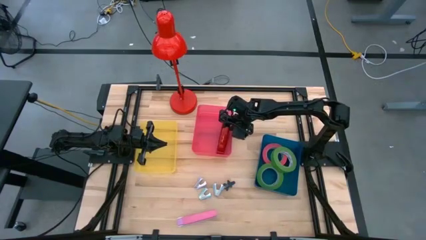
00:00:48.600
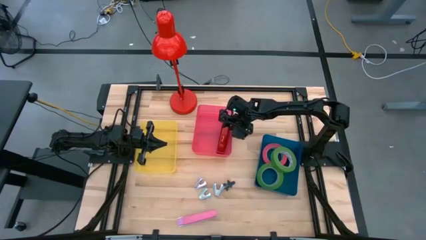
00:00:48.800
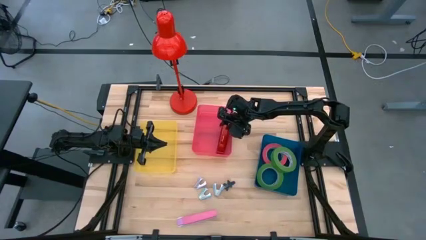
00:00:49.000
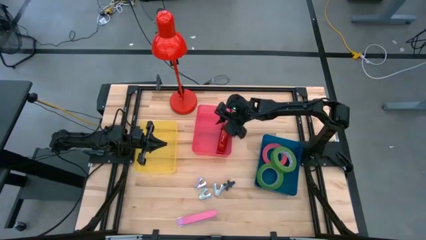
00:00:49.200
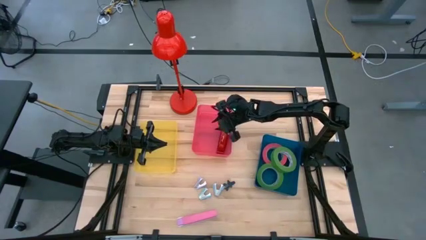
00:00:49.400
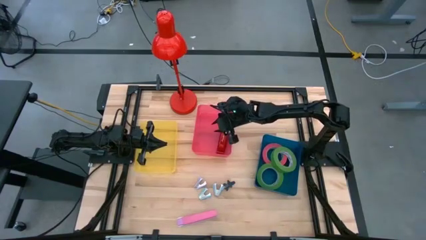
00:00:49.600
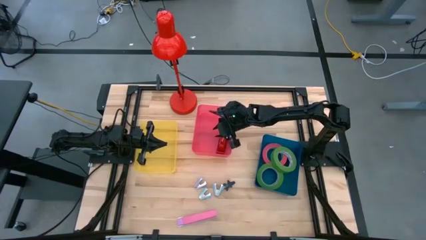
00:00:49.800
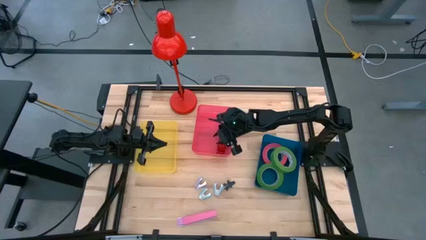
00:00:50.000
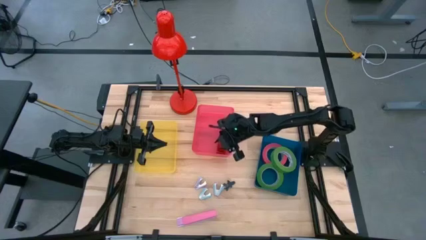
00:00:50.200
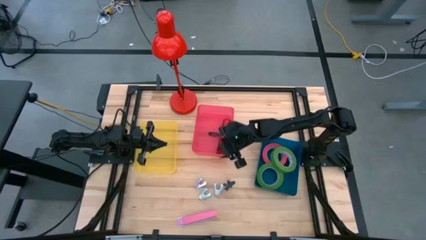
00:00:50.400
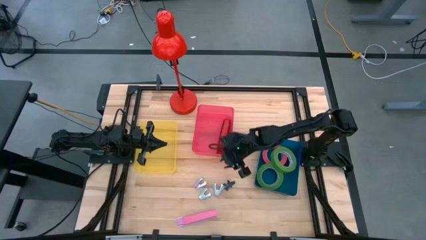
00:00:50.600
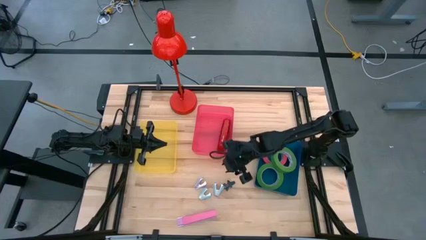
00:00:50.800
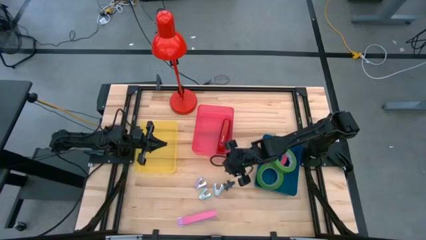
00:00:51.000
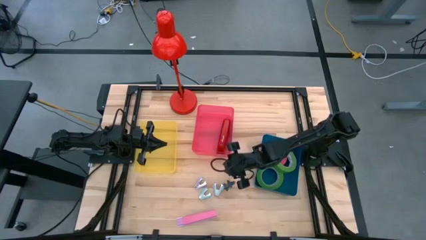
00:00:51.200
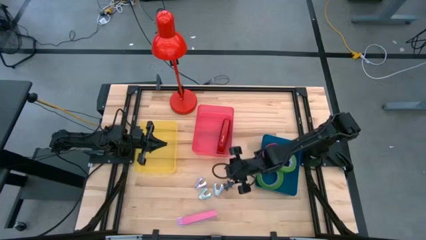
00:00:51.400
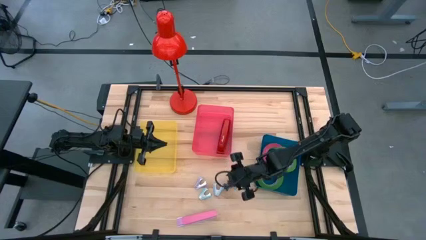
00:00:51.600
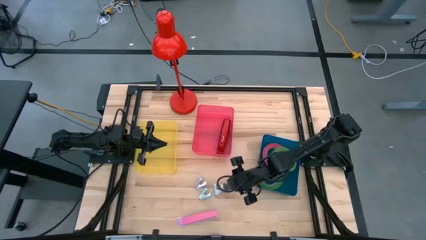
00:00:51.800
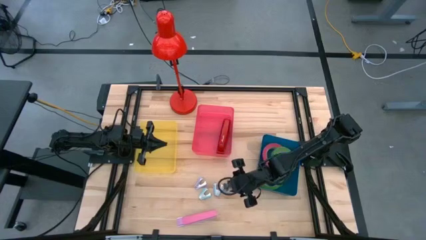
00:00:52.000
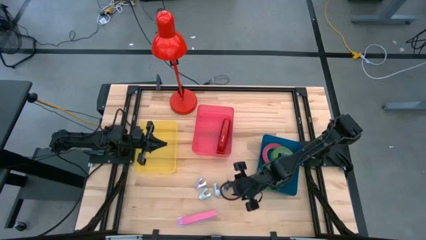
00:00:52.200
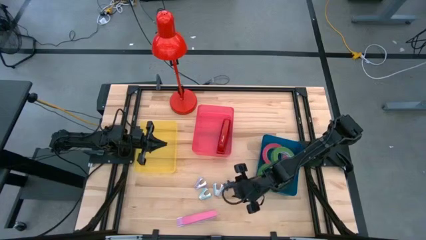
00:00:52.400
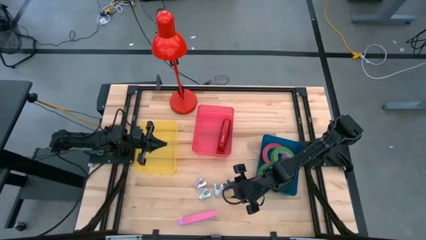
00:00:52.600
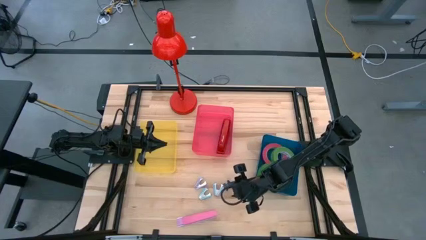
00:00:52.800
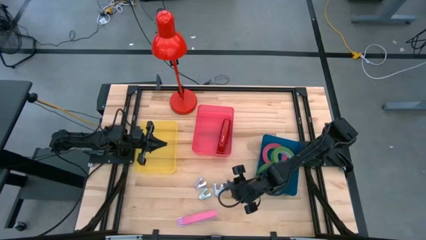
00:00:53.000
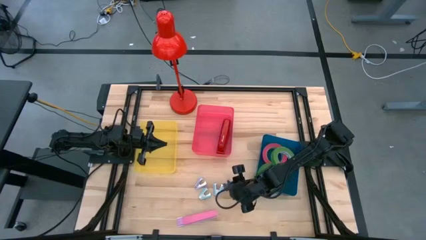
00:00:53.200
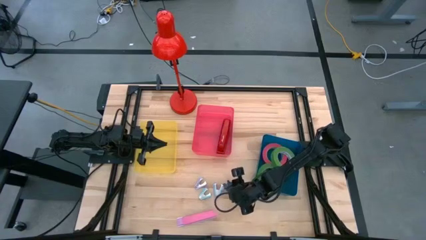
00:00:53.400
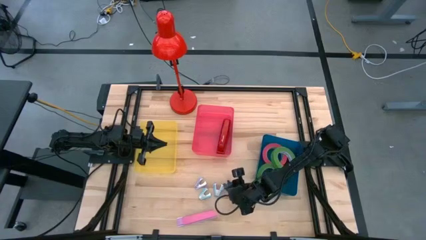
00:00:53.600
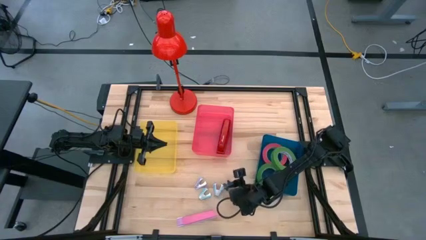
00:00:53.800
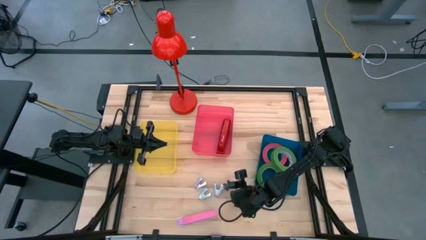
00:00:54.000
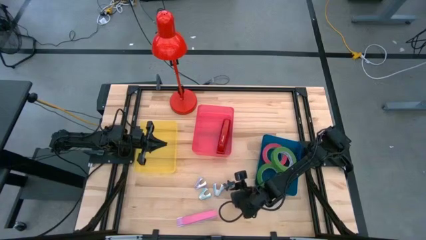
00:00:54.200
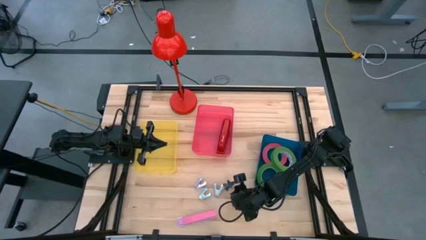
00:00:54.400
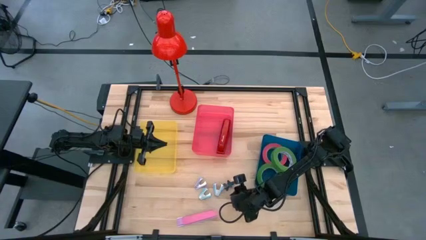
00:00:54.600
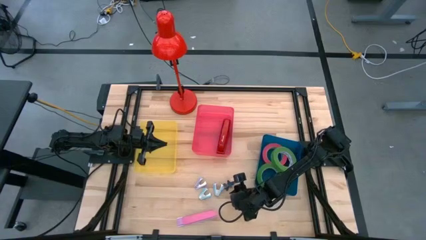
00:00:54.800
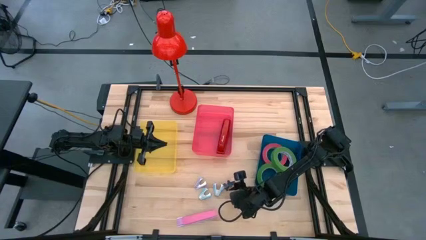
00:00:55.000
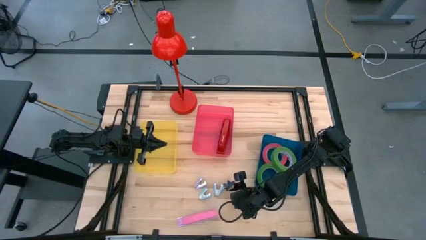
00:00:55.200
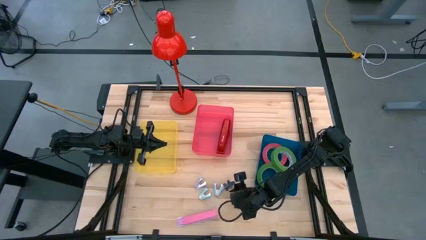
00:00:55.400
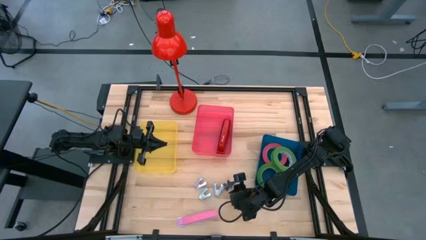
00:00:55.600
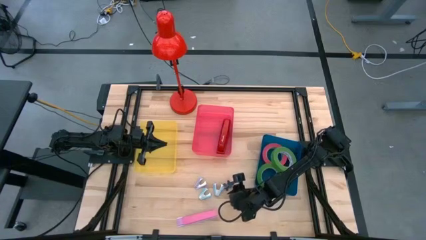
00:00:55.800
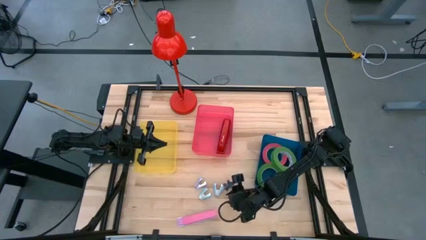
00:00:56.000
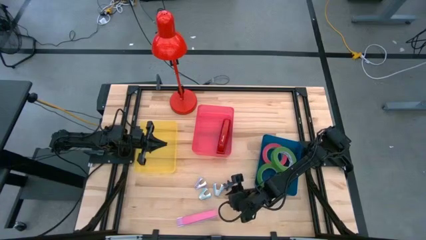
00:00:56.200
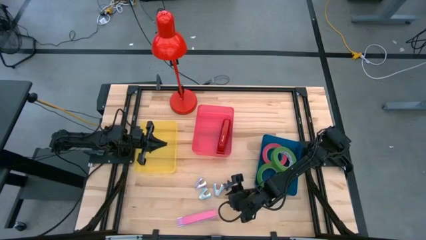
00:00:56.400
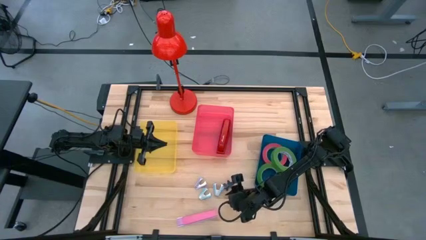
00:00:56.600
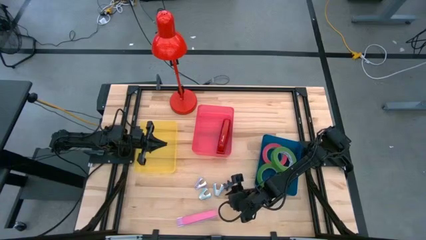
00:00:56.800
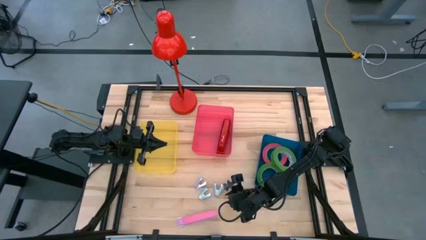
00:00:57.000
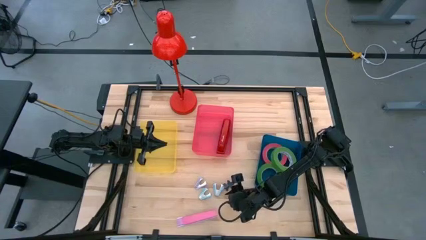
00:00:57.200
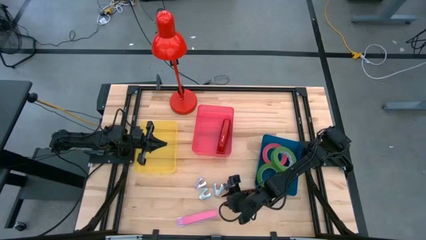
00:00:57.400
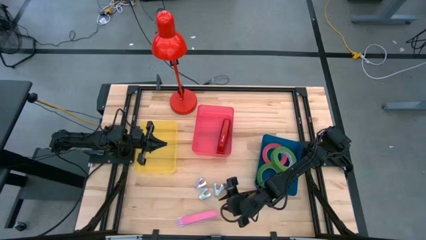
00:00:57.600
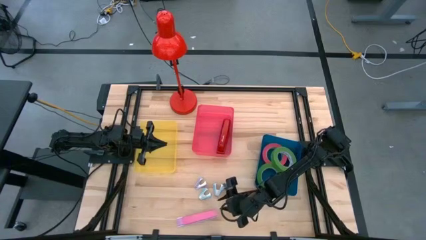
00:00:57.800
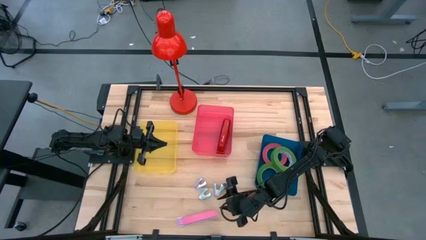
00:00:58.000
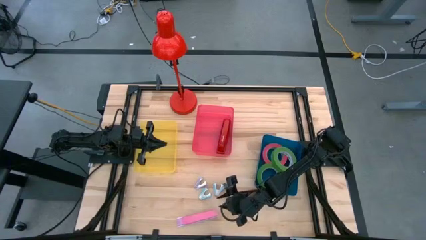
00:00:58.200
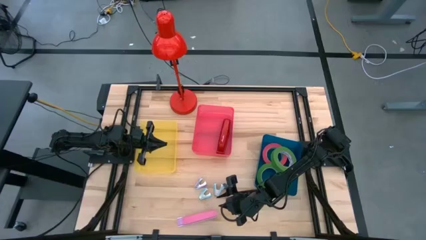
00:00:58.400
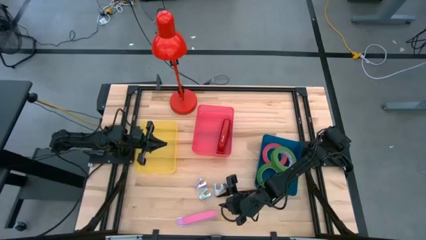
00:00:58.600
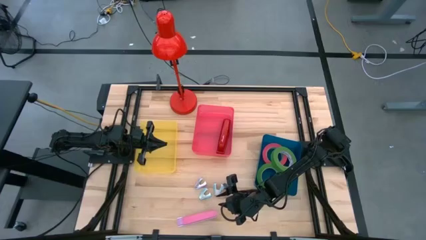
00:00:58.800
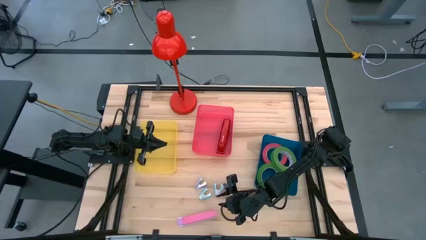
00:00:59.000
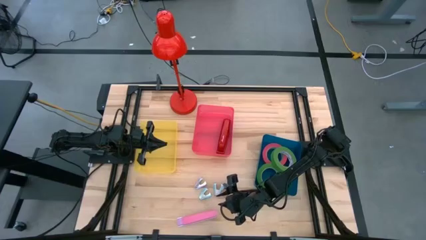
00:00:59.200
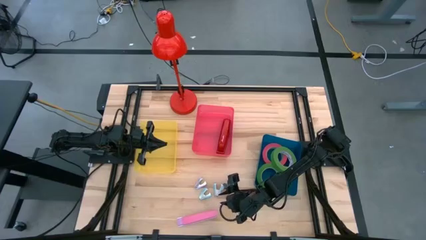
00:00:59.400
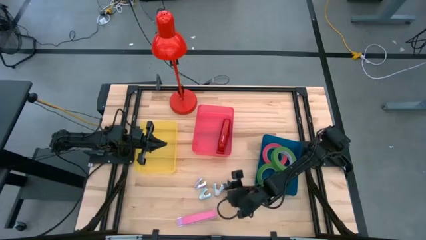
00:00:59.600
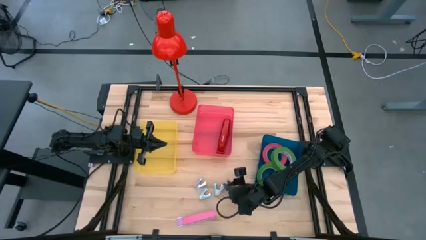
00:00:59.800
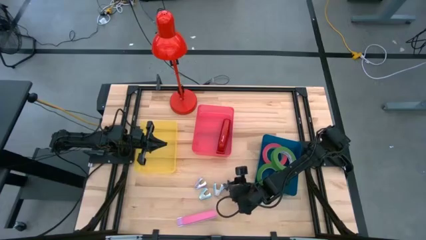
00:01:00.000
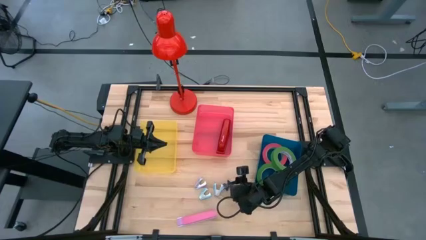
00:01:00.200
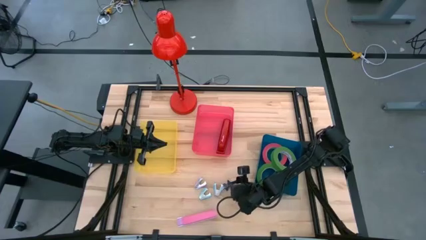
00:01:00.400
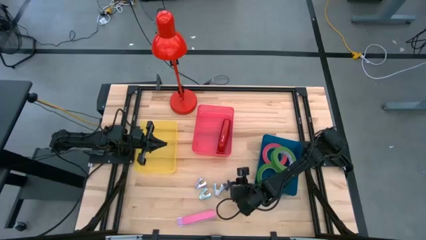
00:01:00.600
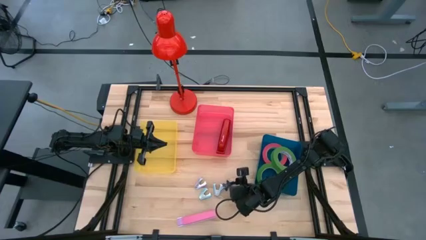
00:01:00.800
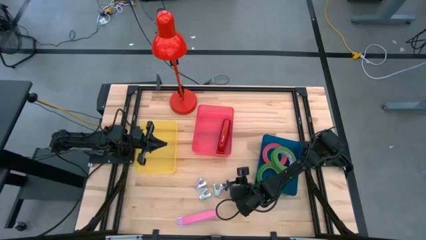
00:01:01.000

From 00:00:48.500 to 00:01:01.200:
Task: Pick and place Stapler, Stapler remover, tape
Put the black staple remover into the yellow bin

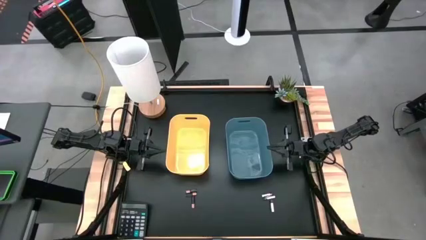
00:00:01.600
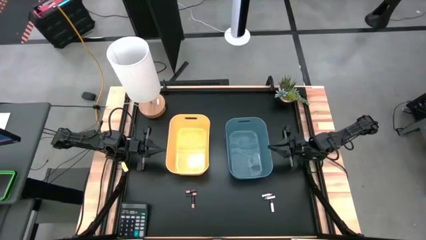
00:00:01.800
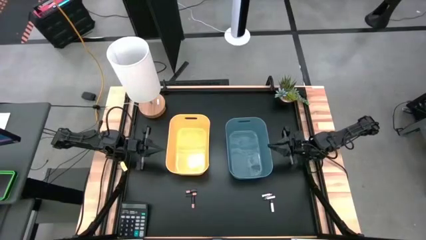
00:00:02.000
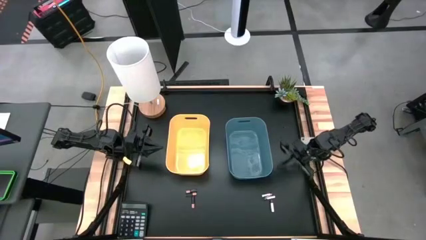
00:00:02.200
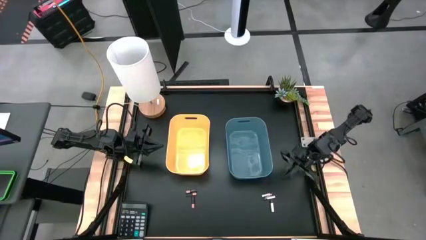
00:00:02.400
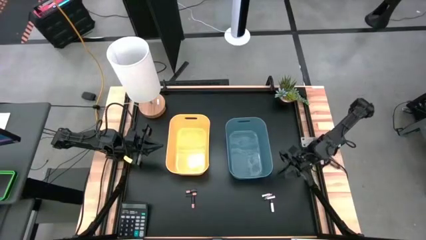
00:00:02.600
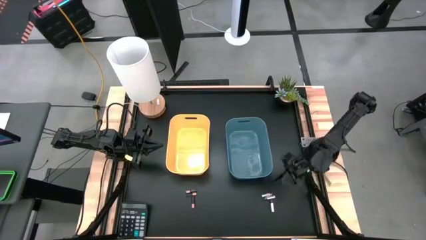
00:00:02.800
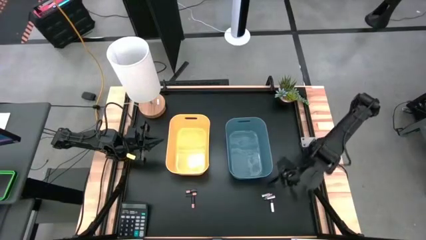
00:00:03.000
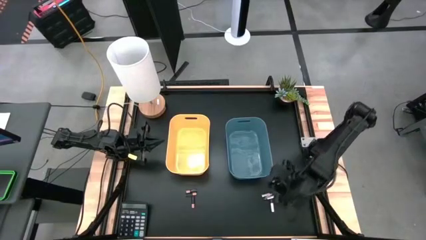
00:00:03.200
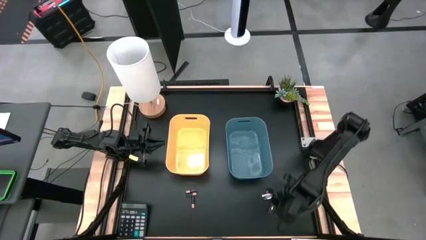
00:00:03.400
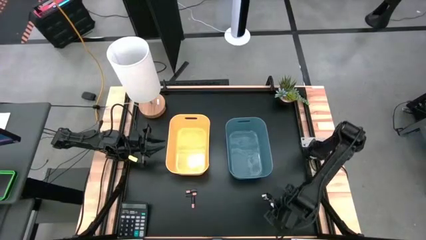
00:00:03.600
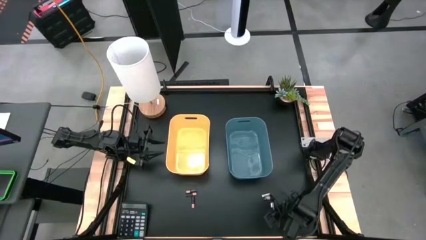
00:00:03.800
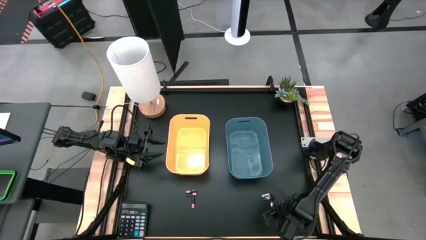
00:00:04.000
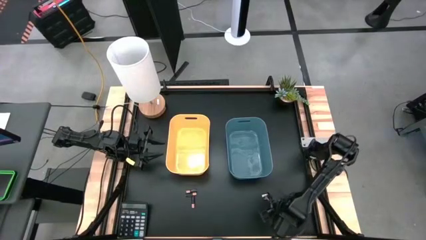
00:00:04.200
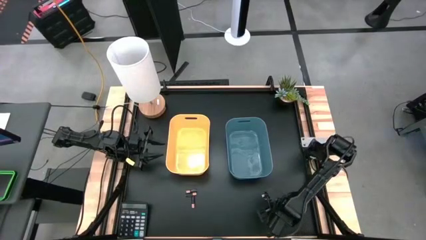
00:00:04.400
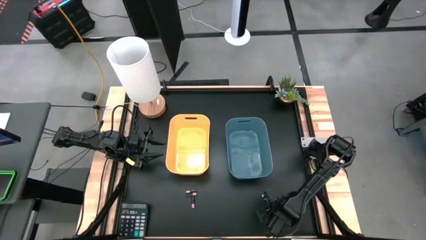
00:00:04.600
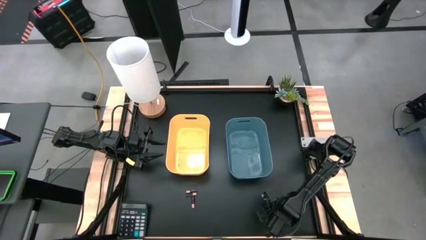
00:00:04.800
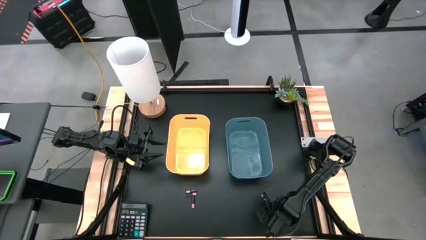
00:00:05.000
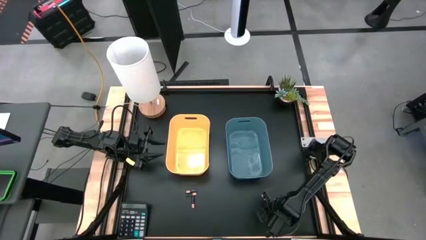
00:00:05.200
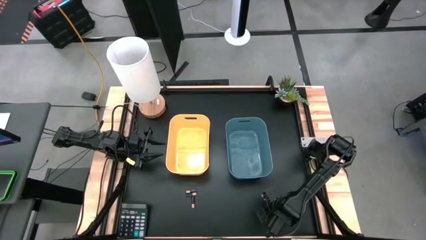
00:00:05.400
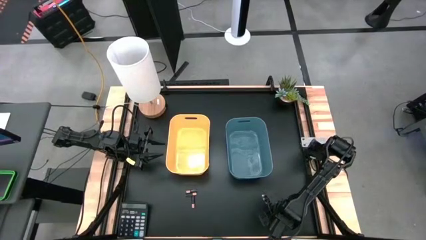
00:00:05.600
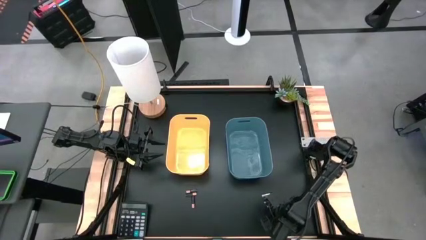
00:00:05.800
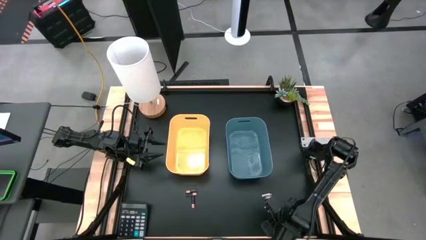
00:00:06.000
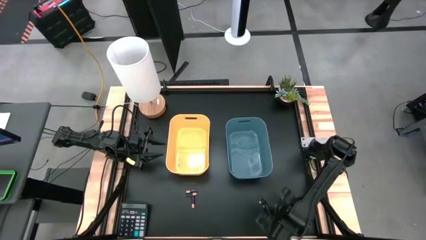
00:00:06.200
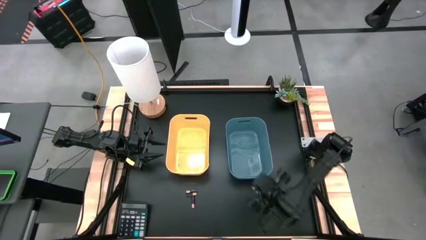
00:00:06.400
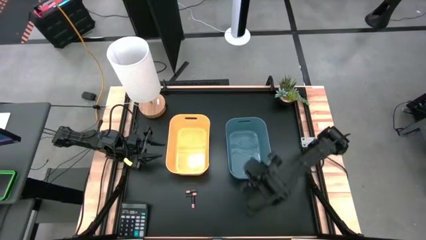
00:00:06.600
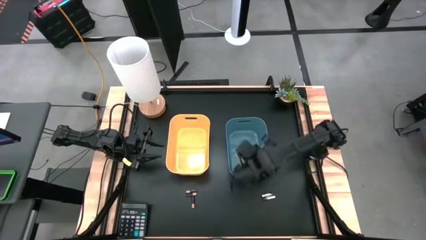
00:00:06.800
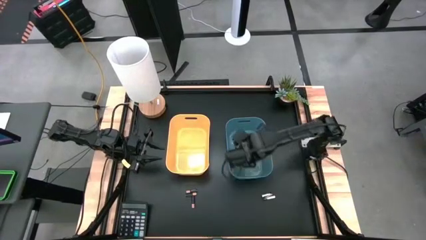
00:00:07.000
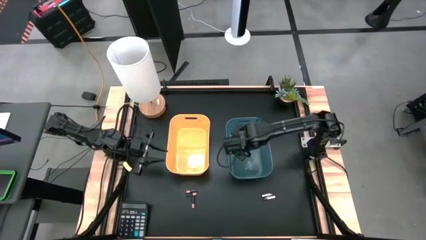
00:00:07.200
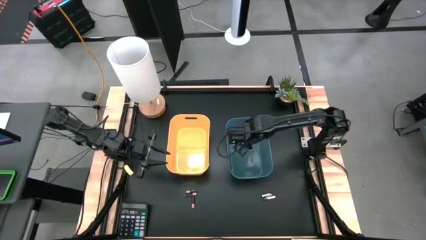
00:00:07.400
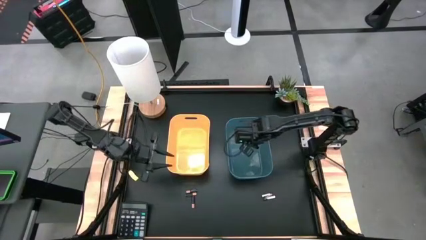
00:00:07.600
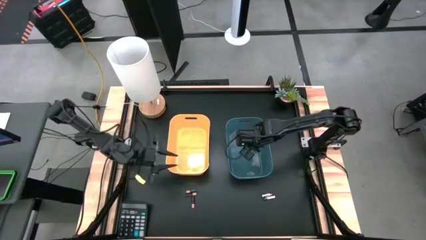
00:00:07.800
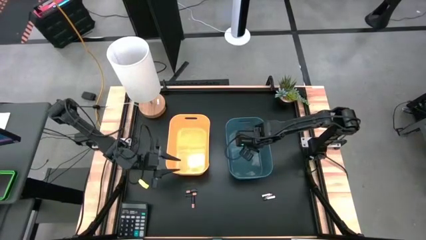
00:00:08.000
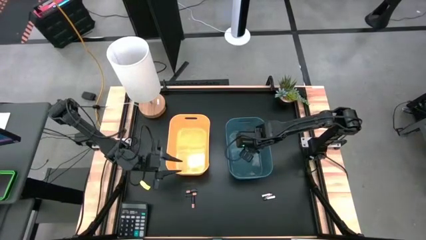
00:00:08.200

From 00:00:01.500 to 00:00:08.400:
Task: Sort batteries
Put the bottom silver battery into the blue bin
